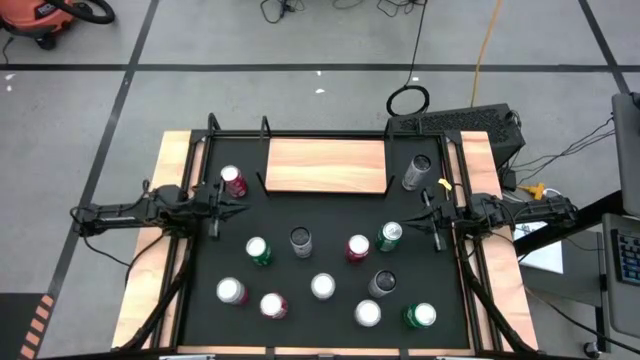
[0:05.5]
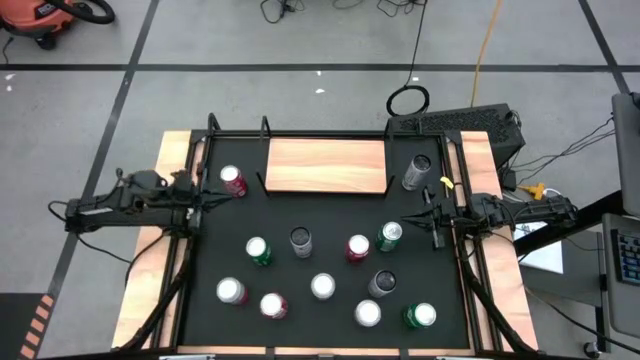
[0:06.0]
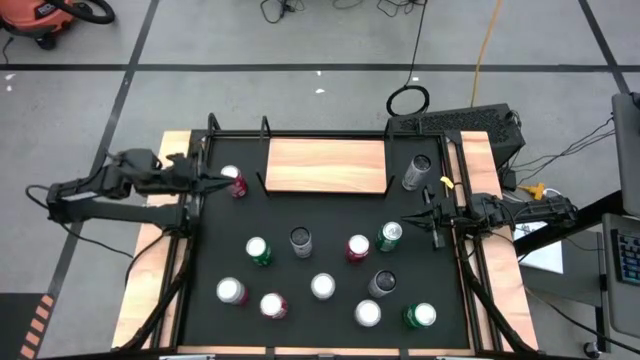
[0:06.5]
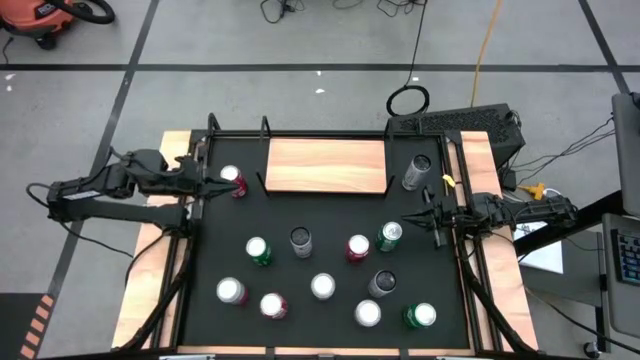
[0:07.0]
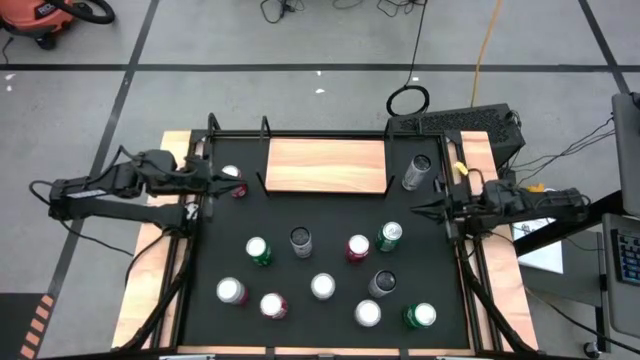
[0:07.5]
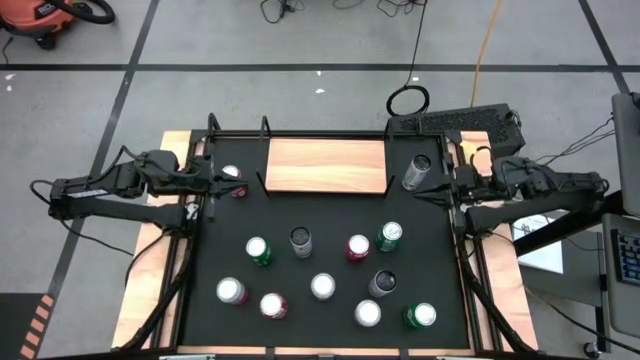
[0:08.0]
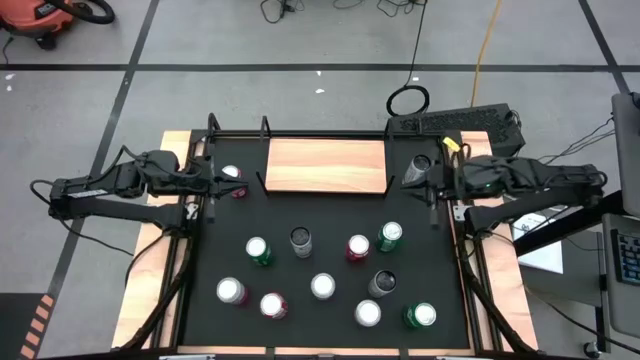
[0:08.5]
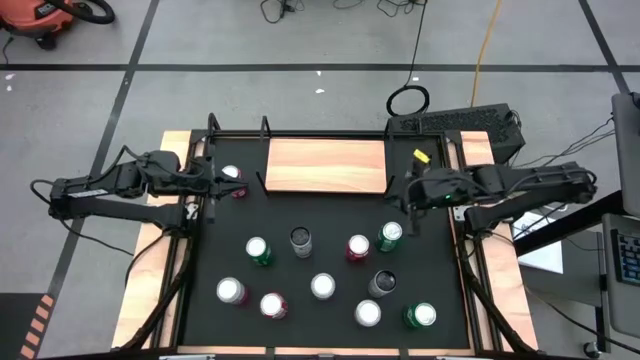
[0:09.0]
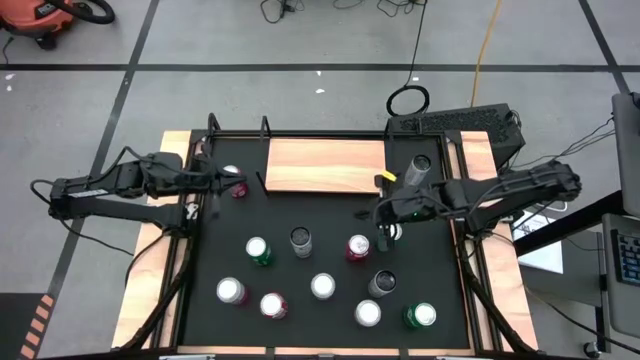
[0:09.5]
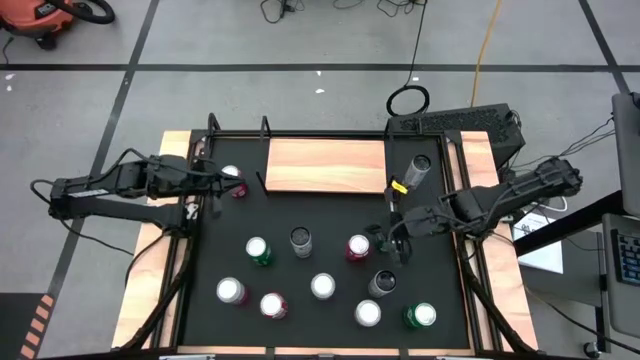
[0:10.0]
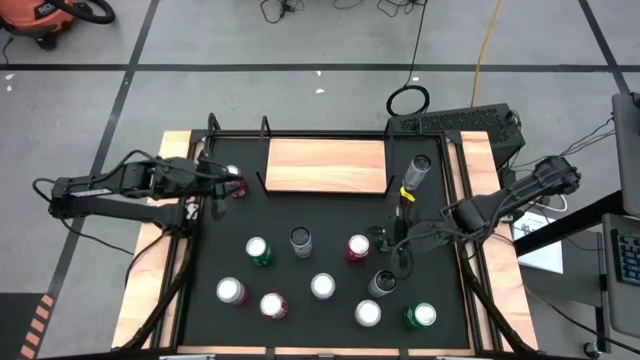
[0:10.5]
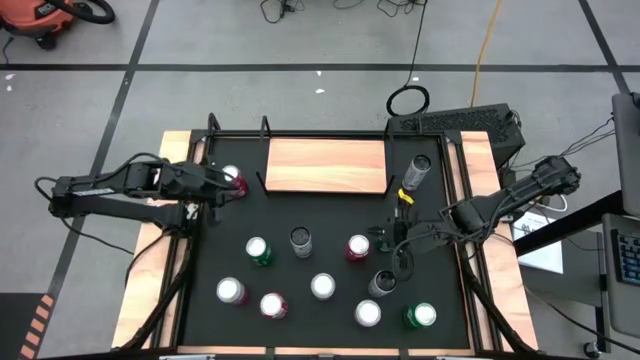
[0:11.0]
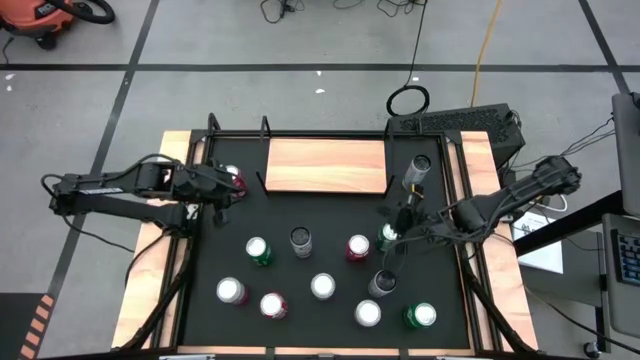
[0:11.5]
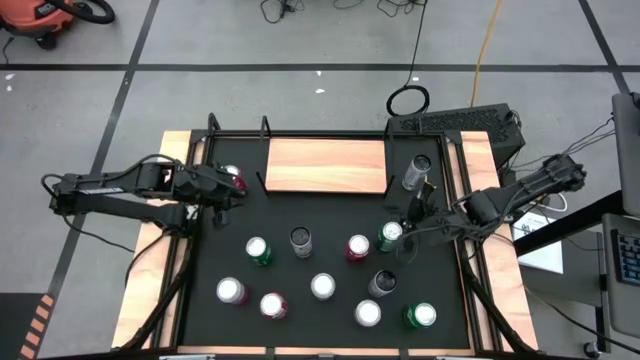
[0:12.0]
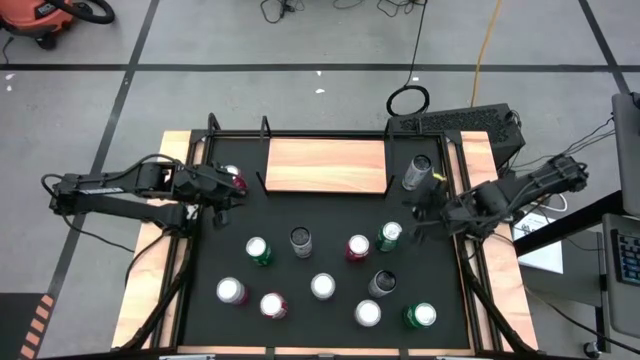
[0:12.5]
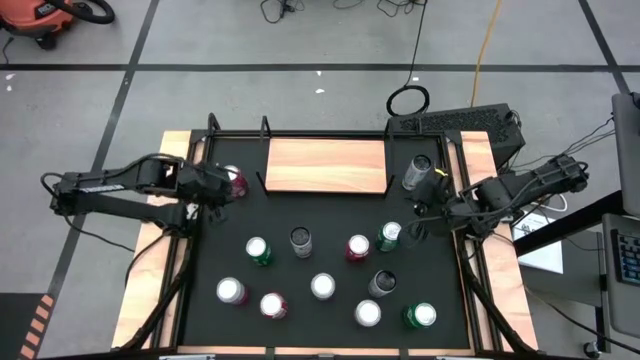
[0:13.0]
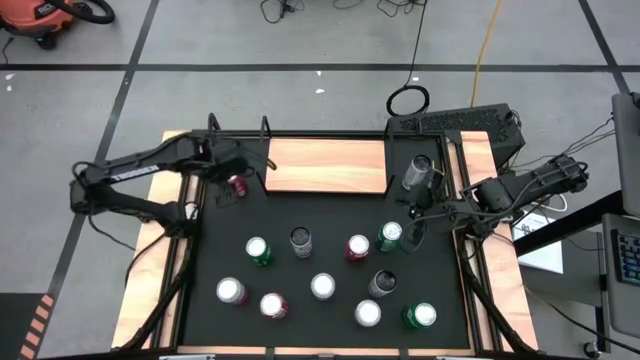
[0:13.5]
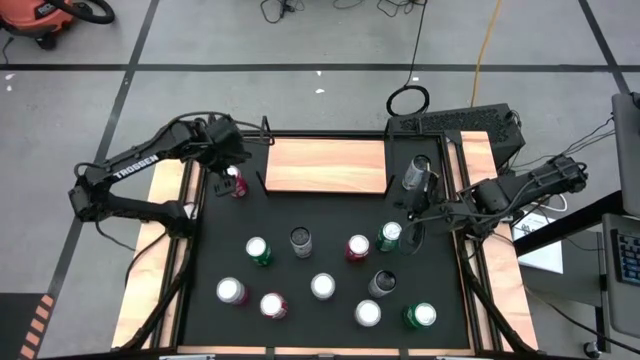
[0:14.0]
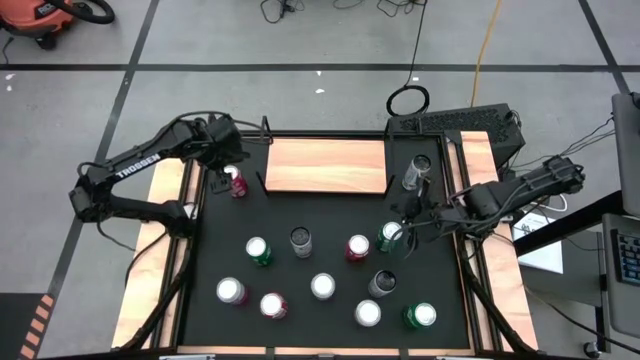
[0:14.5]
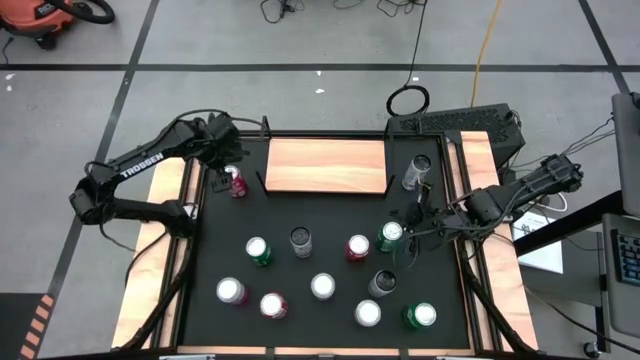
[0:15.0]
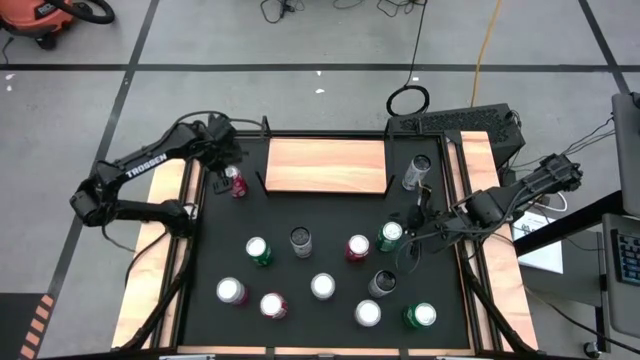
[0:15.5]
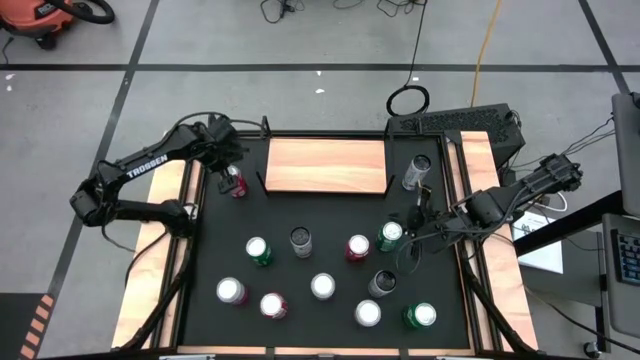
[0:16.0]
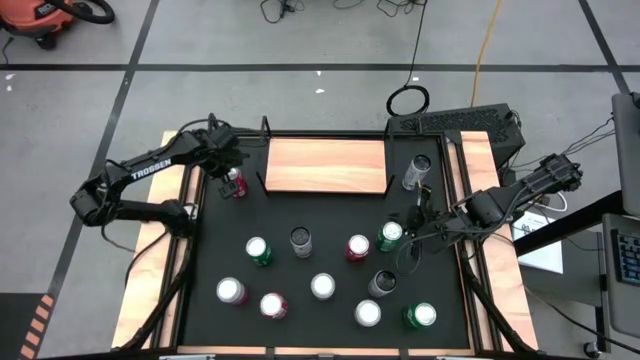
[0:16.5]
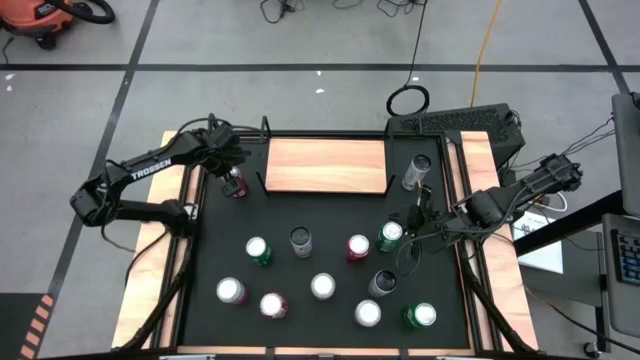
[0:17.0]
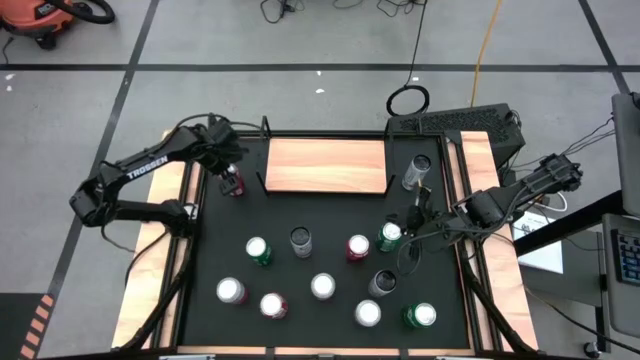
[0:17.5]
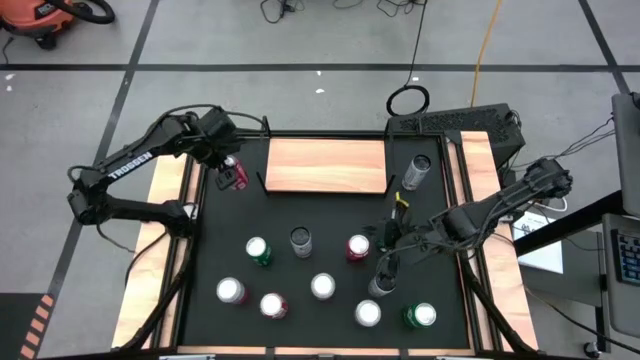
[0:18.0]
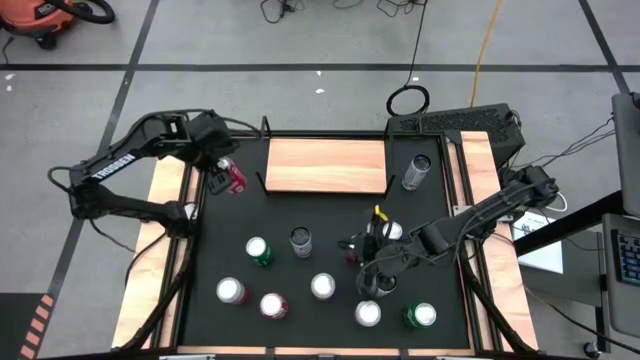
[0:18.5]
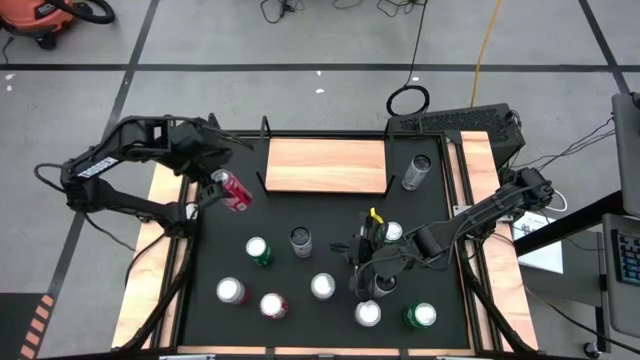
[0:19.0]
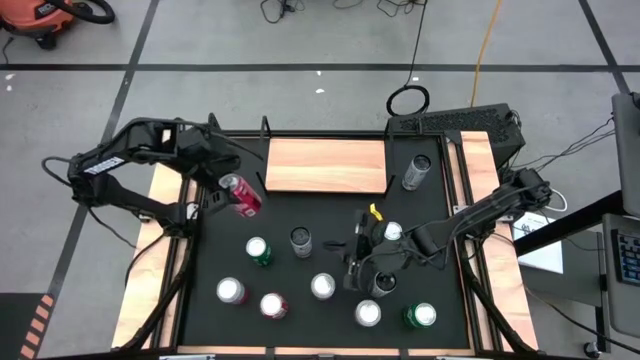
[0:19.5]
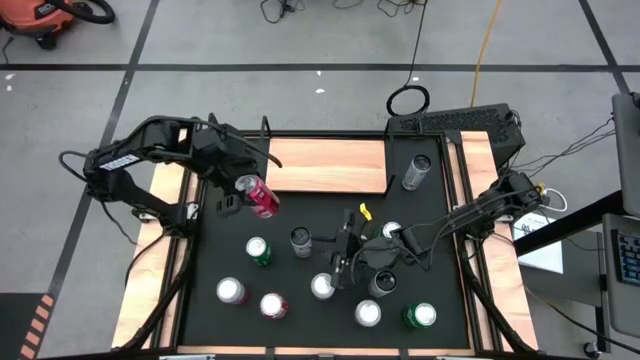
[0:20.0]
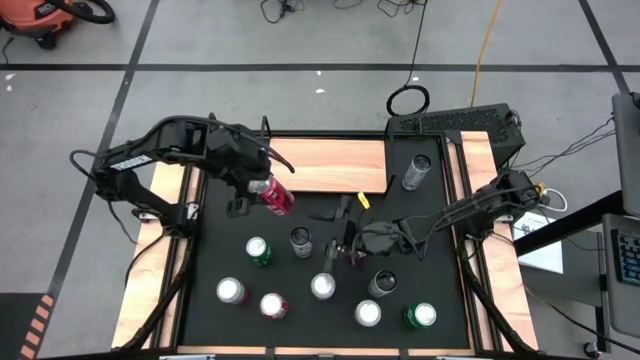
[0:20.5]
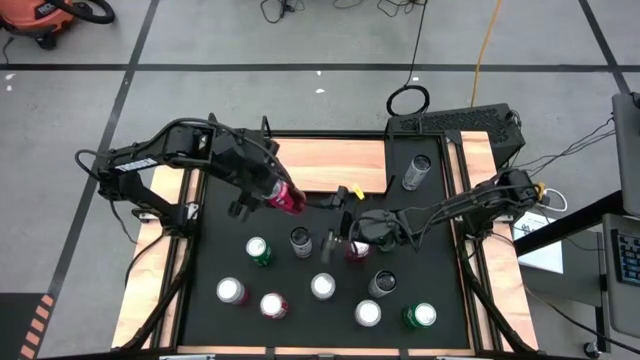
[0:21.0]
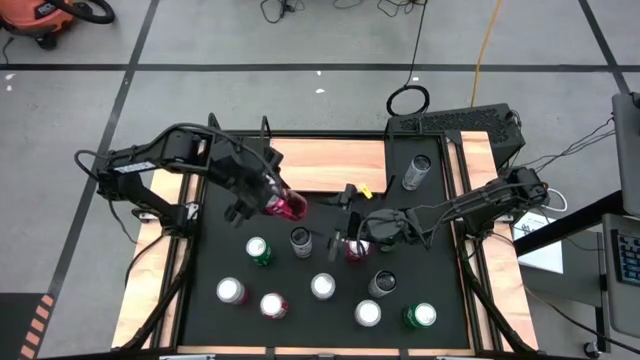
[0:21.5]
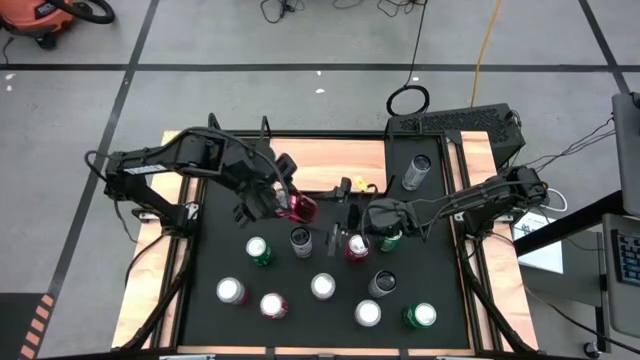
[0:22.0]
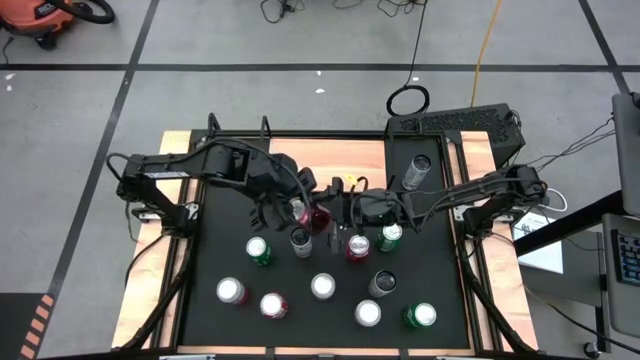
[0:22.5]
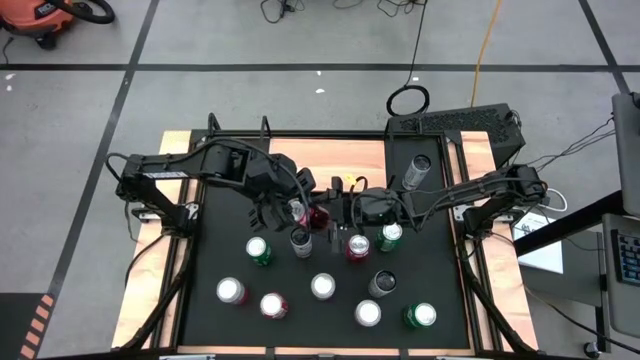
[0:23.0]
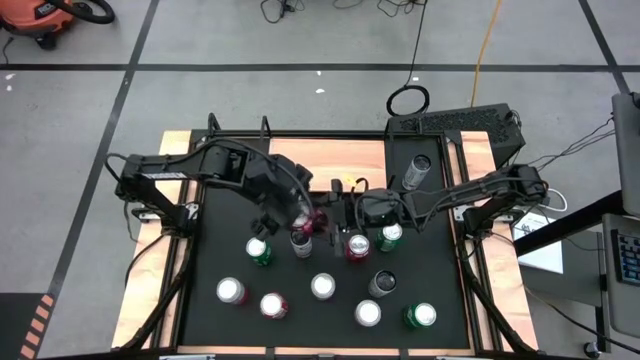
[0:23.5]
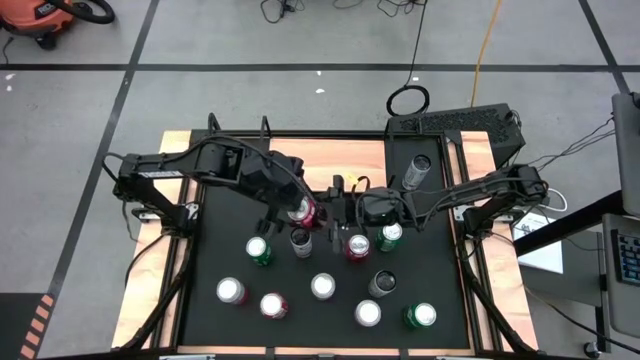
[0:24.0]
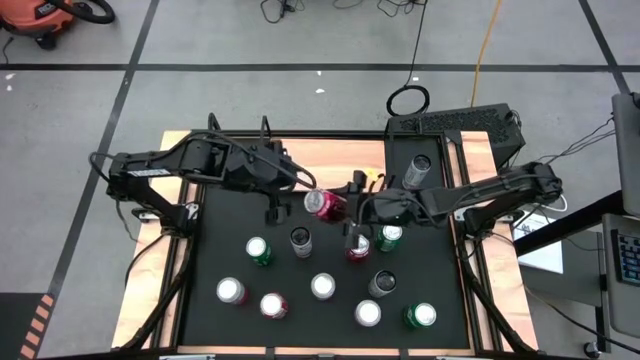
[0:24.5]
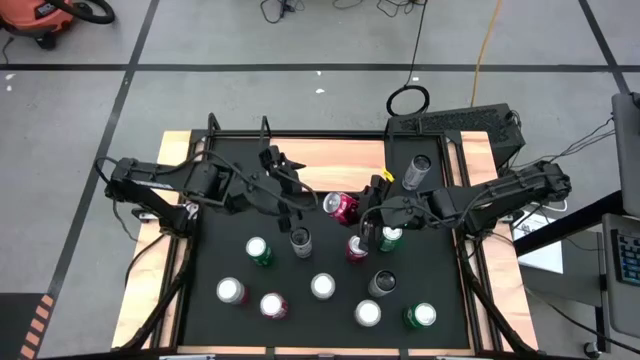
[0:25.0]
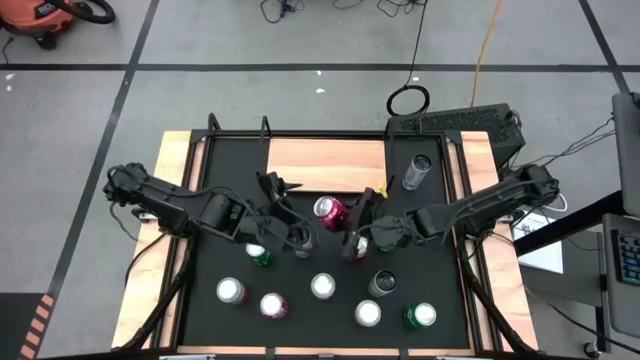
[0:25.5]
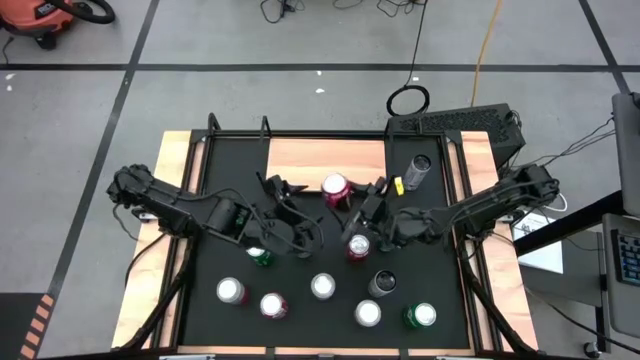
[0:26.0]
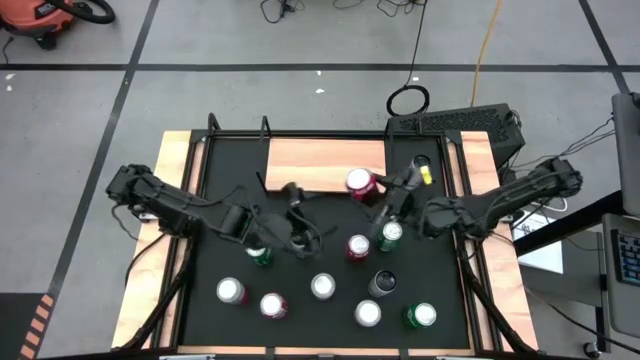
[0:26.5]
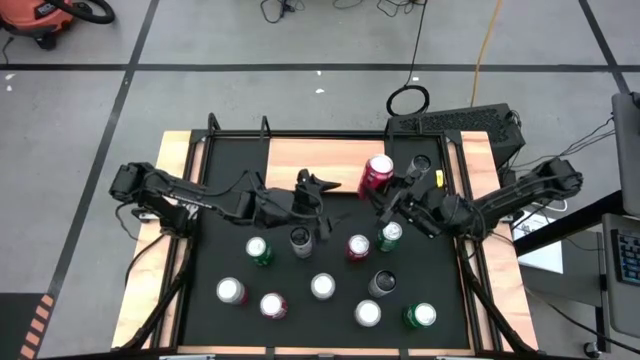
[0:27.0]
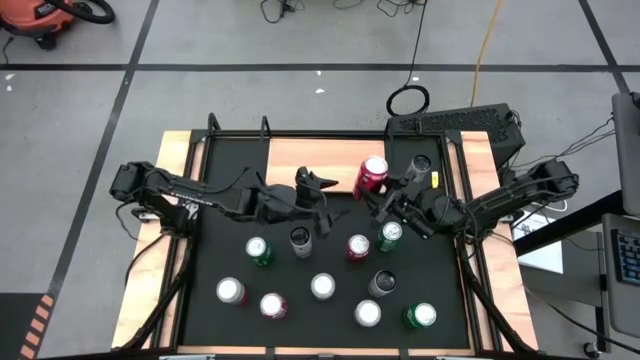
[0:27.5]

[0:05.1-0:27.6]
Task: Place canned beverage on shelf
Put the top red soda can on the shelf
